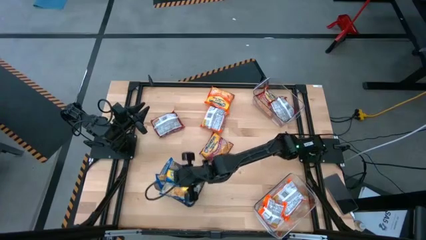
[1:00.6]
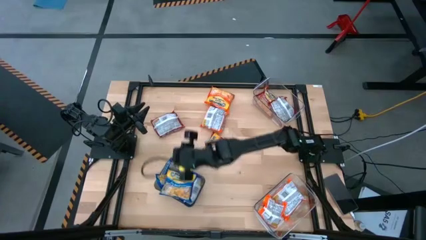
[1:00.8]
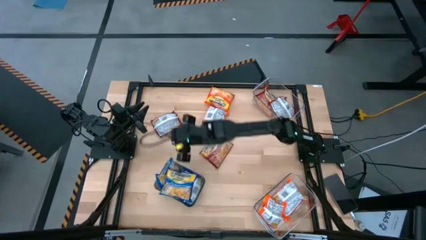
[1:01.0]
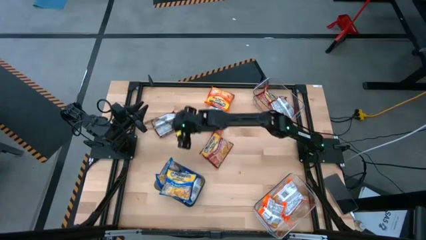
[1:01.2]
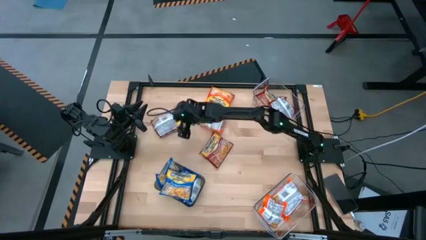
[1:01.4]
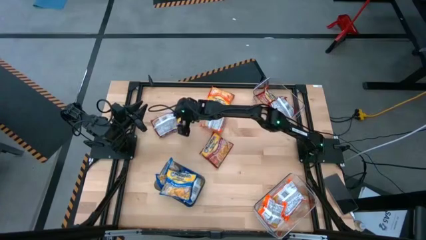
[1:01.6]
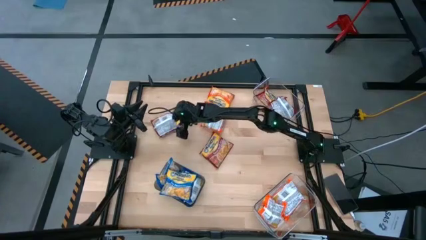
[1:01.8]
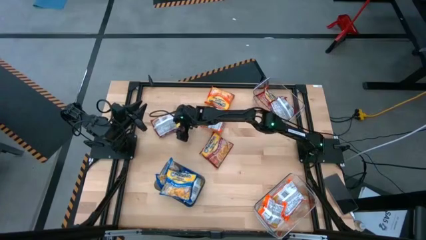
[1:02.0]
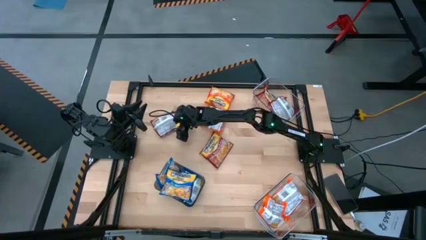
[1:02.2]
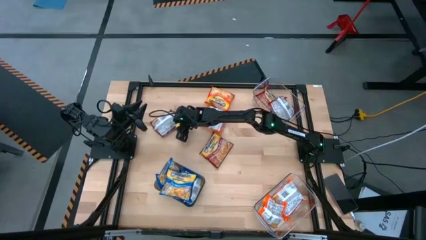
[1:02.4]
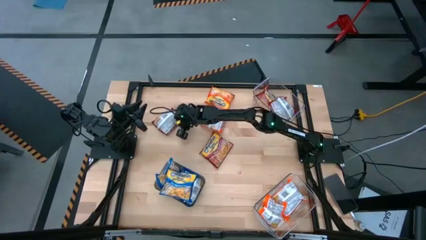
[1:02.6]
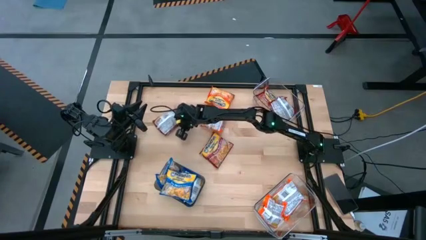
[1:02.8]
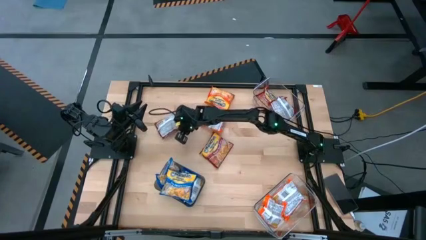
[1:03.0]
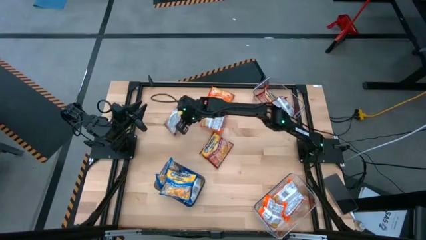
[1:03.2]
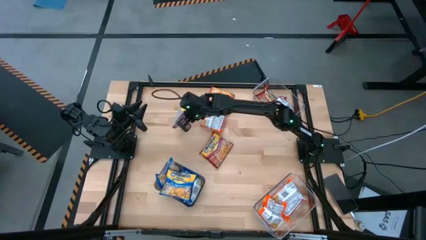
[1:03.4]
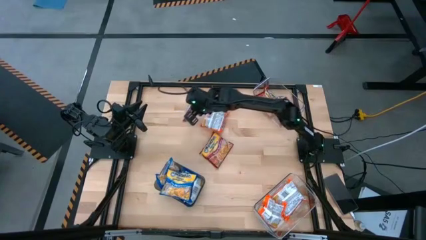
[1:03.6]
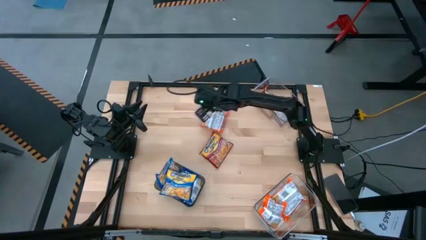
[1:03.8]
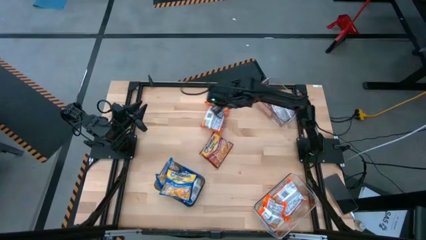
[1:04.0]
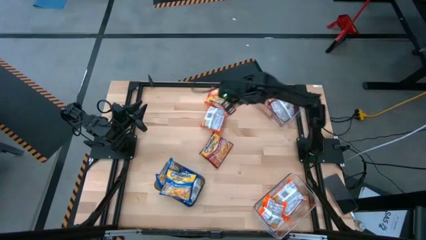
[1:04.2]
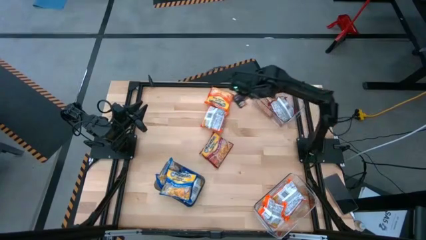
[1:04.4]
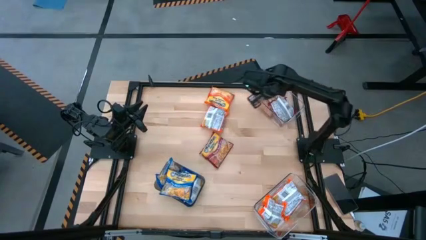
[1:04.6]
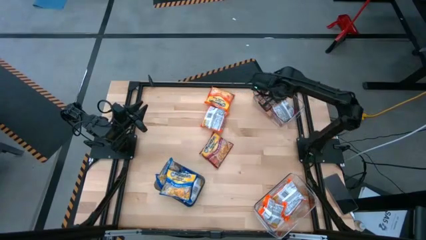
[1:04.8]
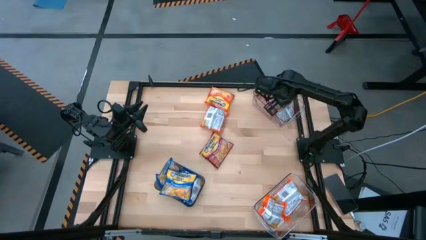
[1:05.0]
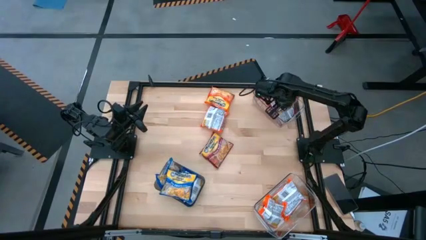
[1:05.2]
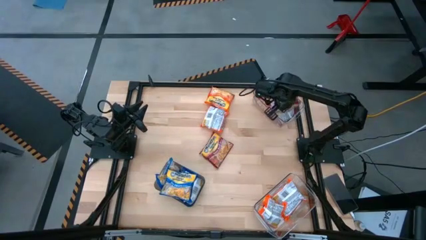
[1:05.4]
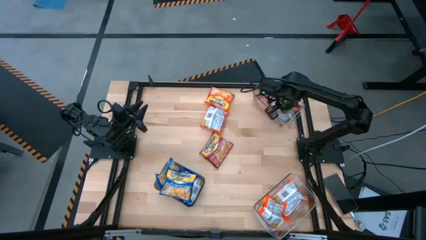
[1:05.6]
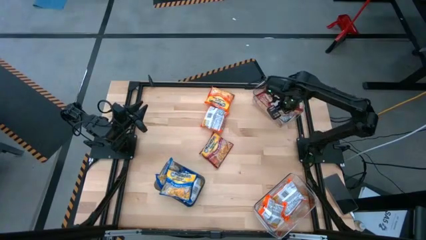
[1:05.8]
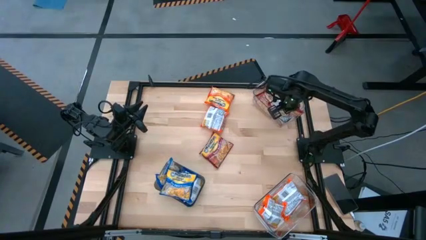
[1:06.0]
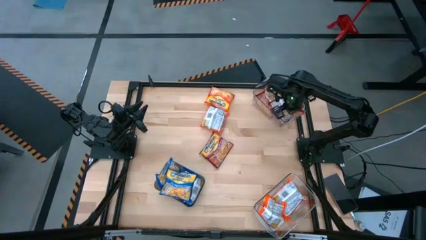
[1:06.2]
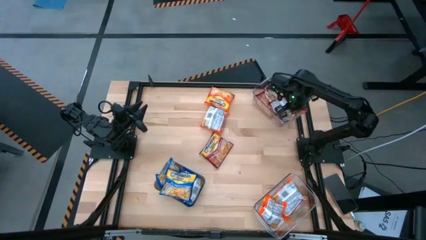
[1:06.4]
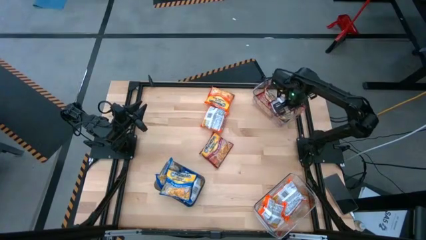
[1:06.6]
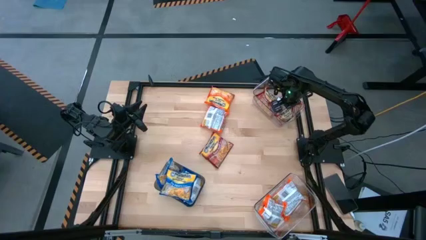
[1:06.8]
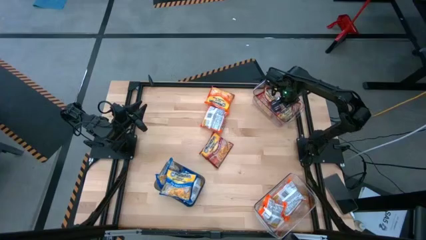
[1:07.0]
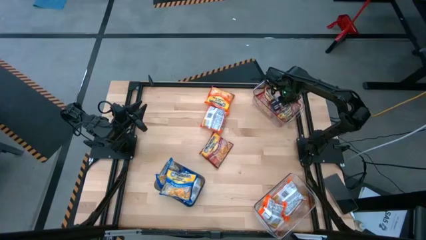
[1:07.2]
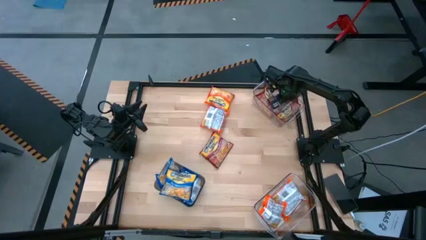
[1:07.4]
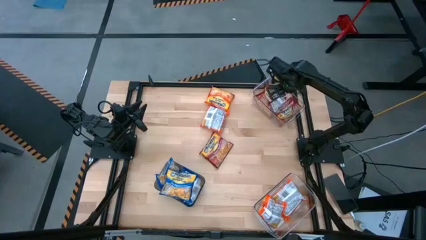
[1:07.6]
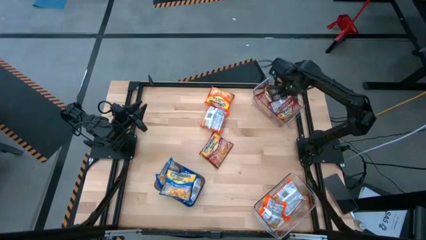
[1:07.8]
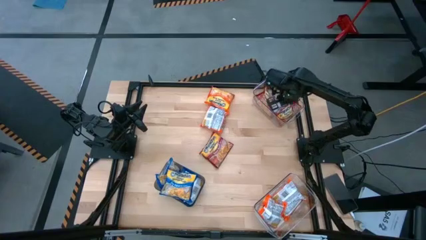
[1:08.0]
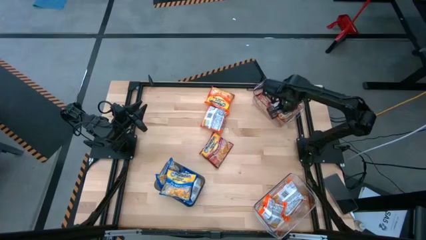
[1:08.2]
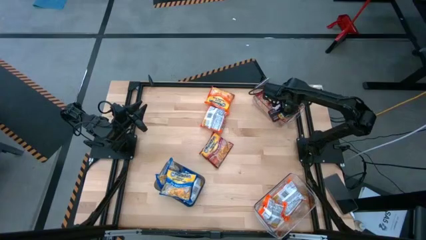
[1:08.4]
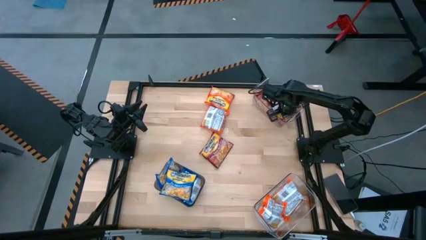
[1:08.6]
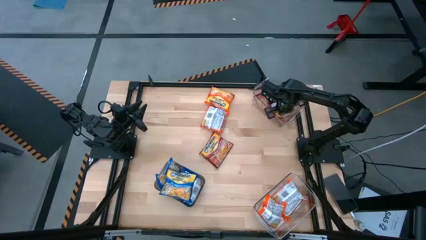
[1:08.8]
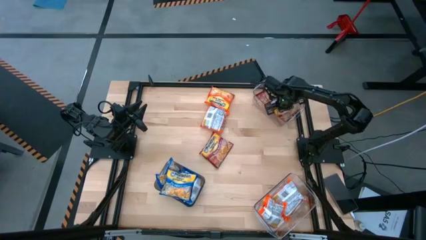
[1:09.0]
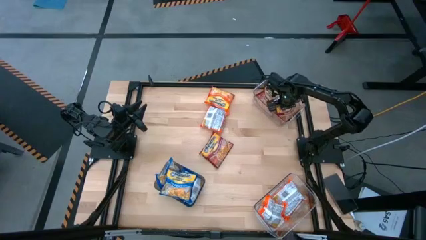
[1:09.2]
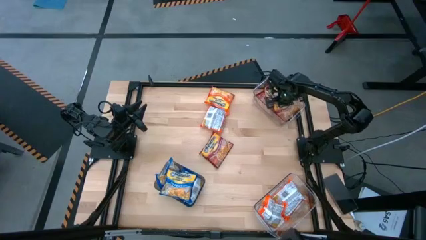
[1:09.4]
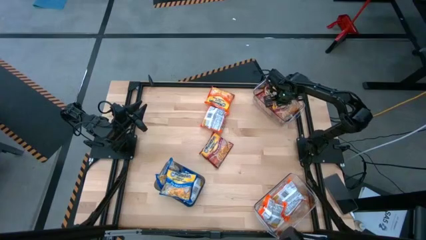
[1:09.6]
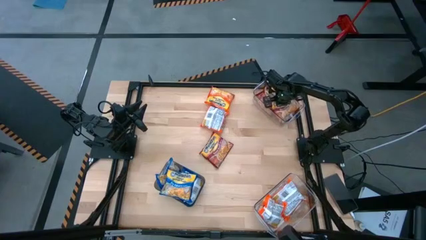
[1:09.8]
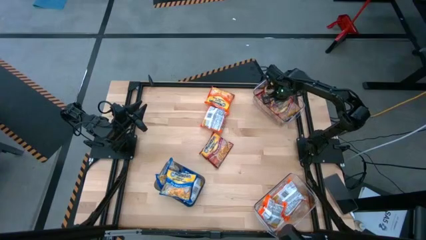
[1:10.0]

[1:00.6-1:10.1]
Task: Sort Maruchan noodles
Put the red noodle pack into the top transparent bin

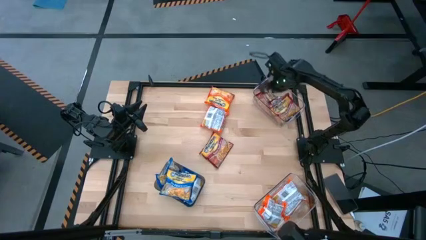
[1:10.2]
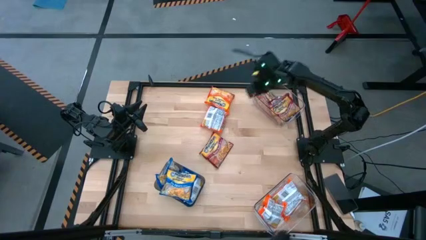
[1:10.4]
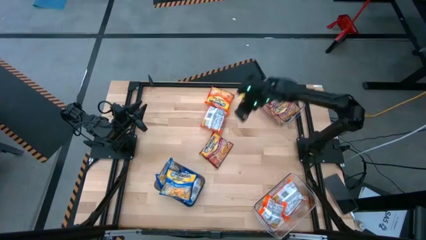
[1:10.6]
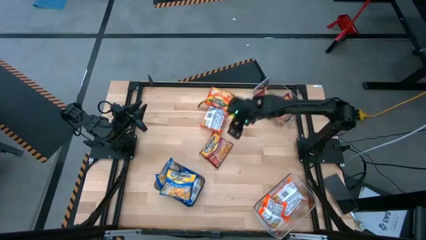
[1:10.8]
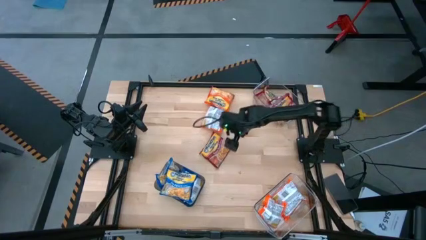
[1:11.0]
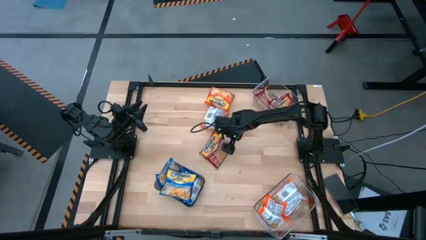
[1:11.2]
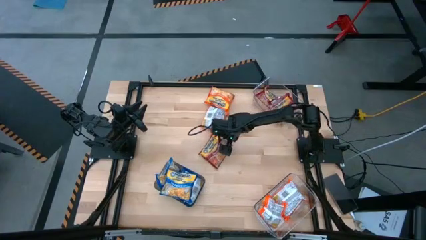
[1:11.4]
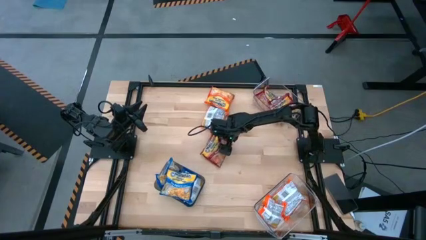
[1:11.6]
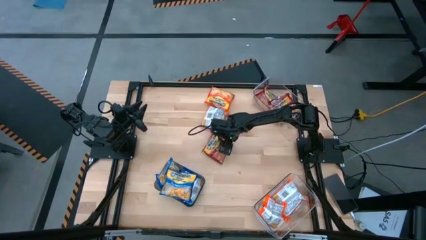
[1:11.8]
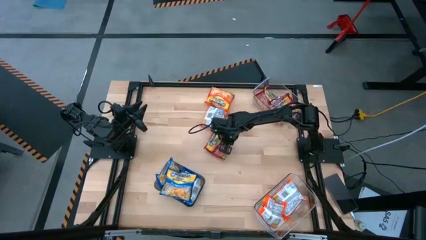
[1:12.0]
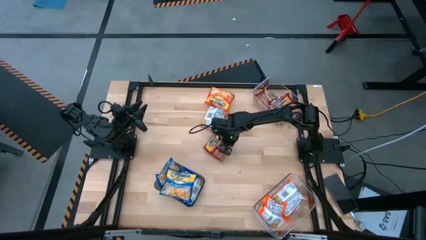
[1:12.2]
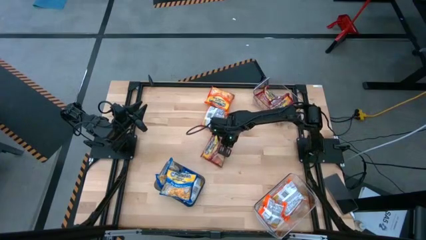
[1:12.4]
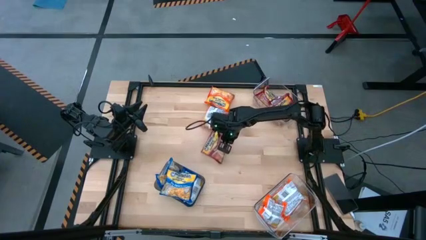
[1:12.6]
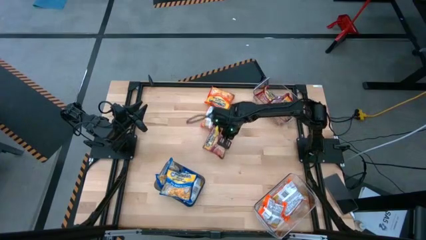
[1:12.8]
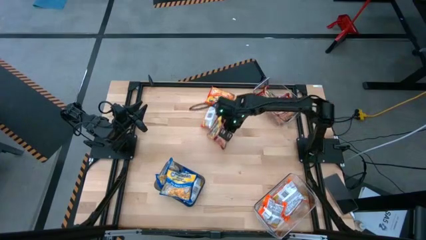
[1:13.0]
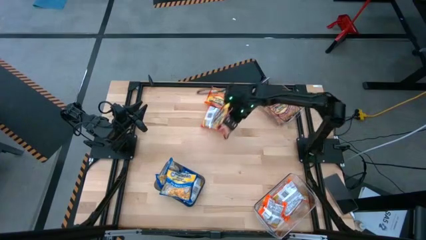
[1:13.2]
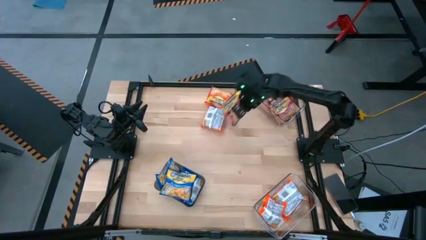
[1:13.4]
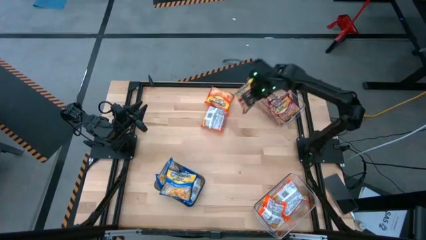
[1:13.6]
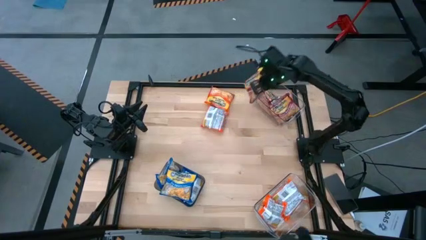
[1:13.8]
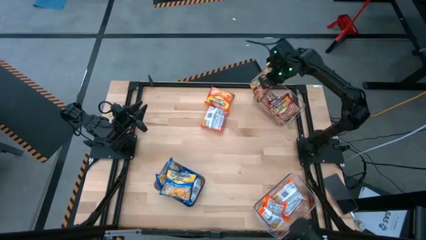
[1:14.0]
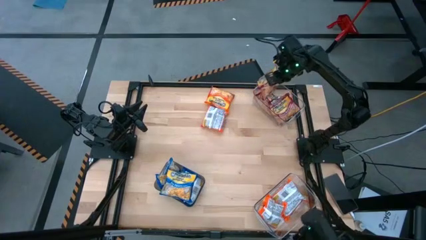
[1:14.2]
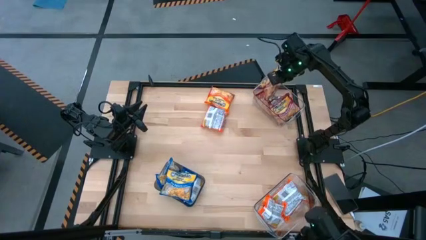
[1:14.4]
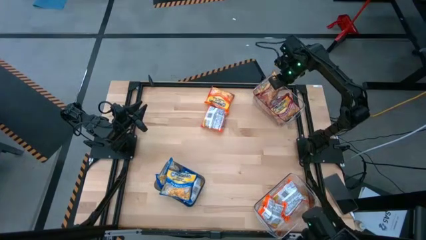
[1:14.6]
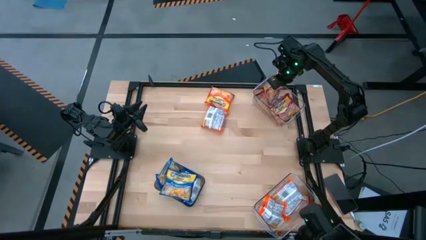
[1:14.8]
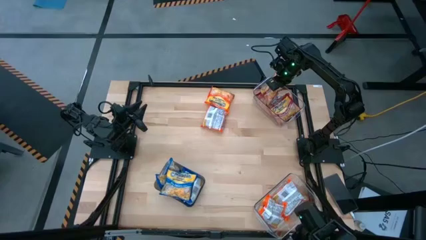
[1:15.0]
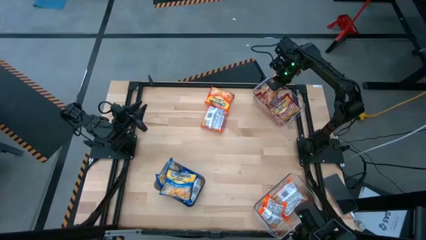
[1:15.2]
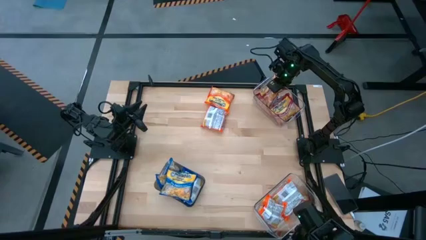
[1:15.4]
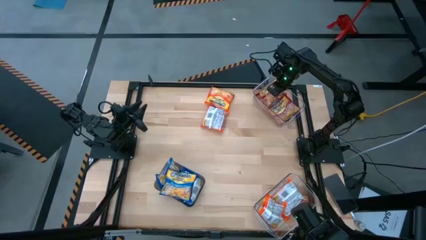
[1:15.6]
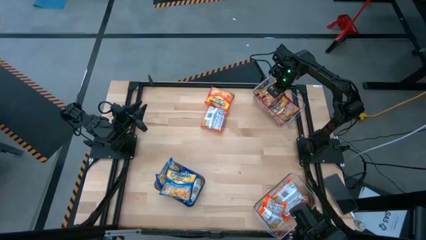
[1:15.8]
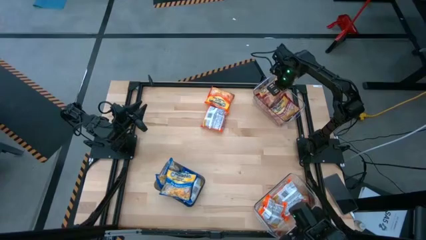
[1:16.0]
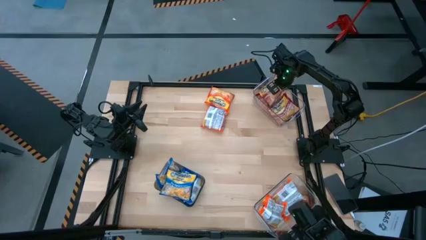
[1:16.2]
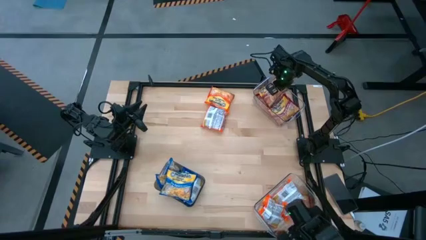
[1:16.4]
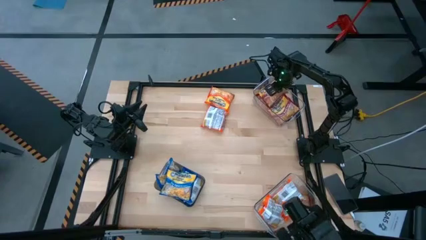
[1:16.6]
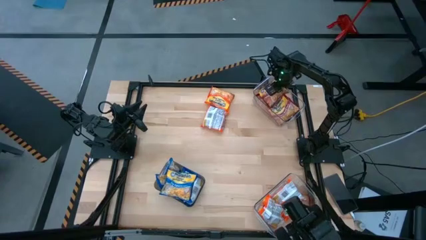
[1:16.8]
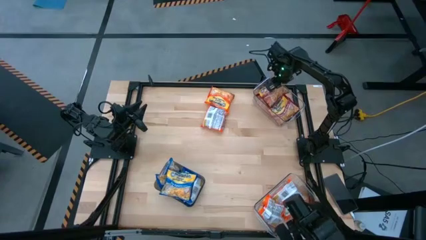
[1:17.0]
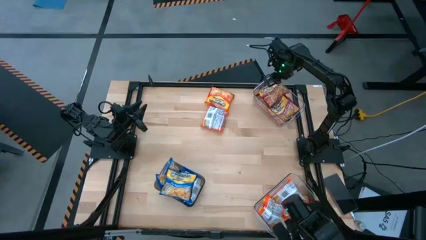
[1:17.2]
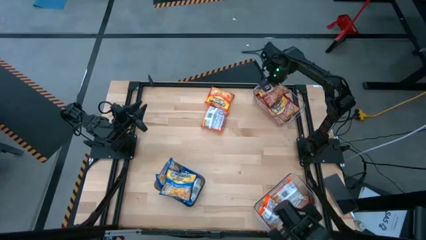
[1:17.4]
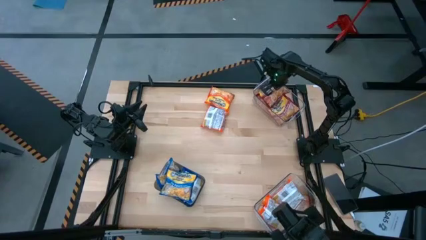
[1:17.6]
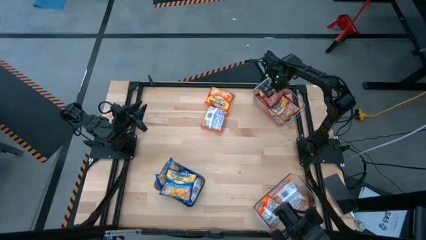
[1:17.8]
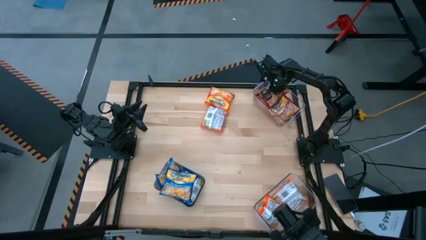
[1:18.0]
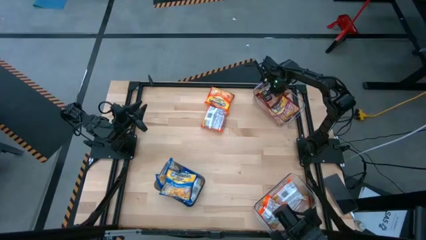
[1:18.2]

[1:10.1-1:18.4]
Put the red noodle pack into the top transparent bin
